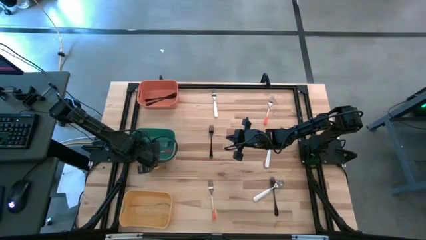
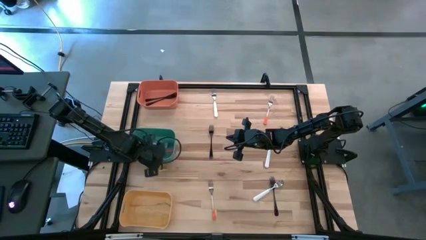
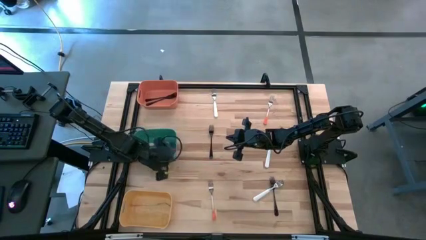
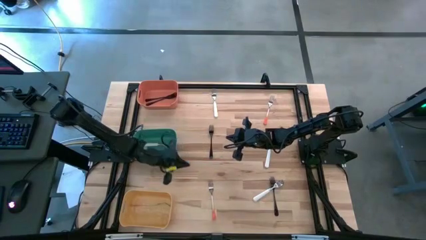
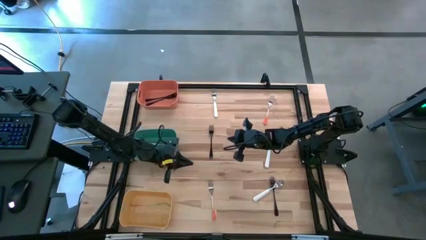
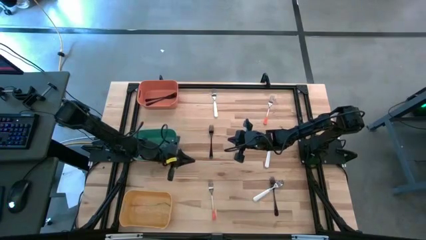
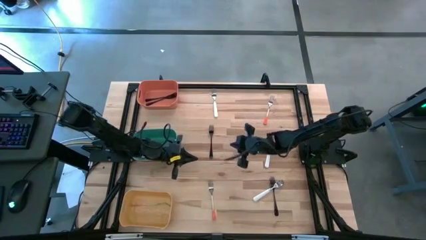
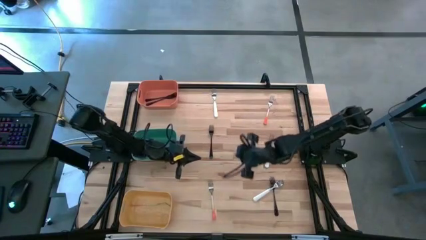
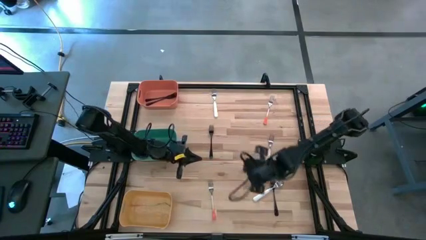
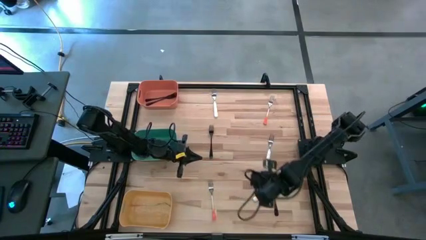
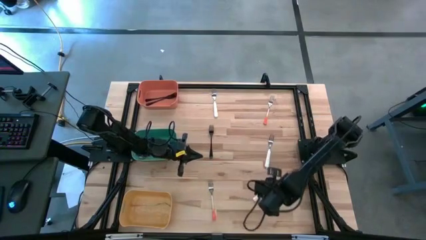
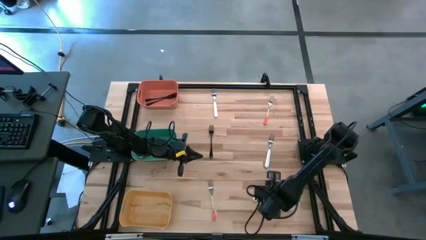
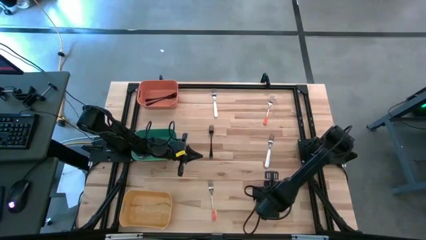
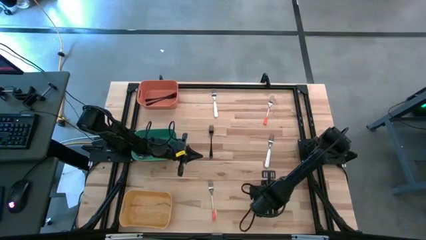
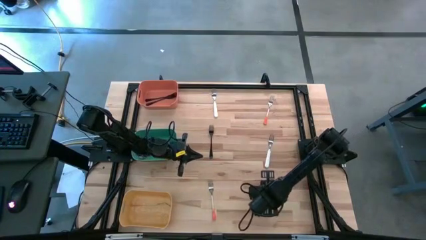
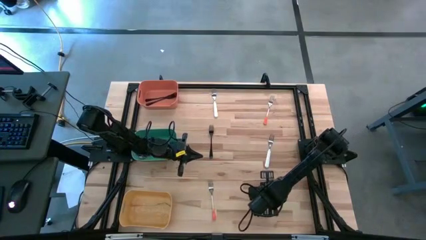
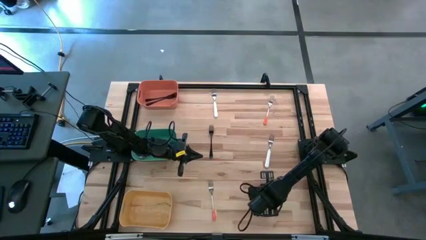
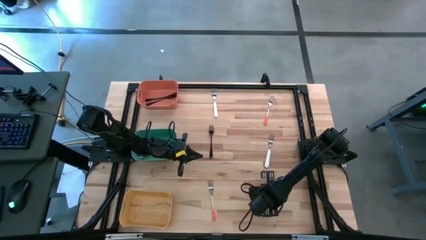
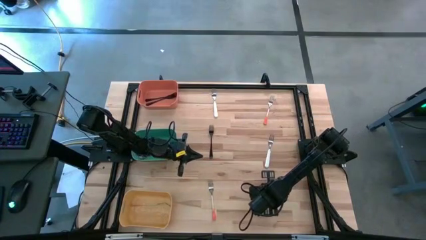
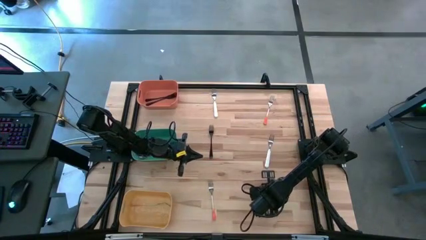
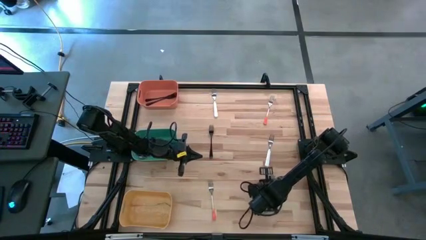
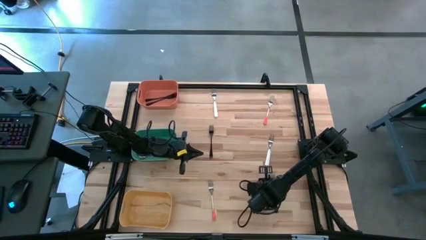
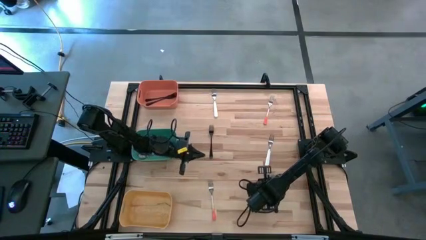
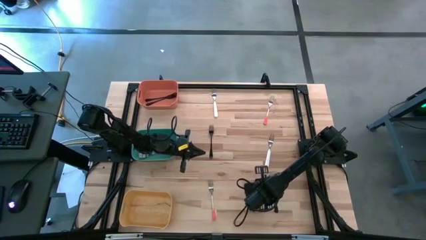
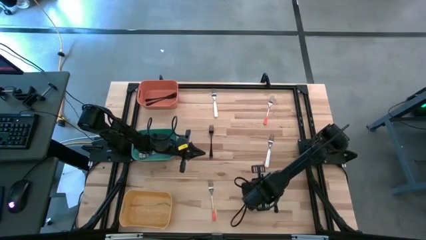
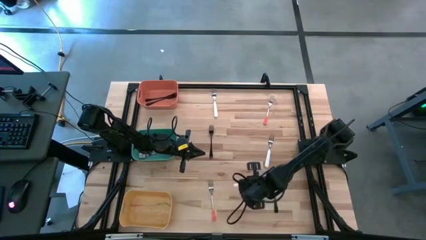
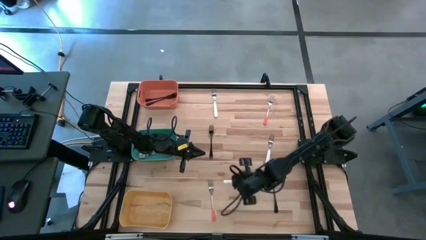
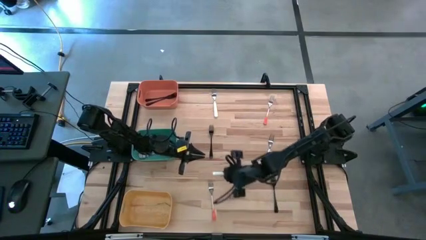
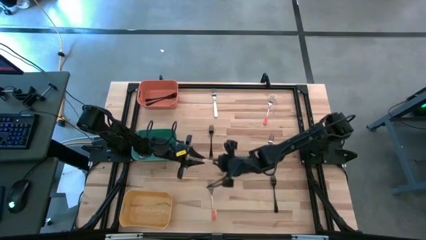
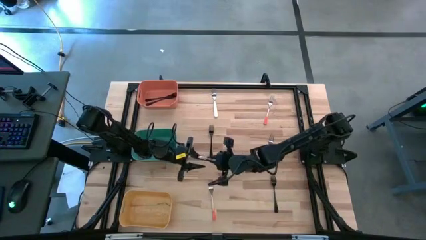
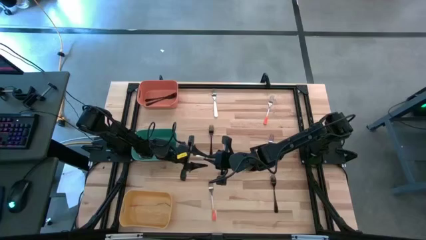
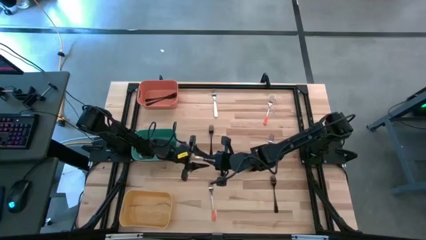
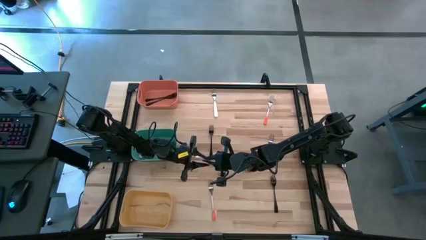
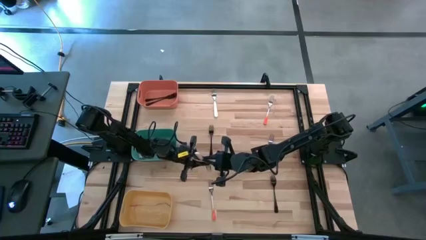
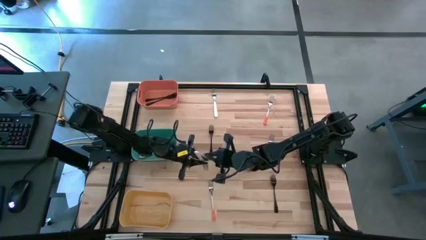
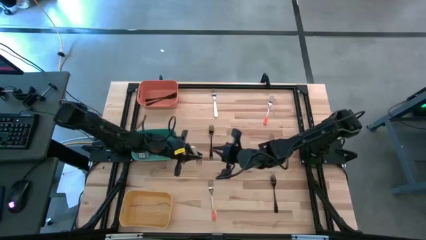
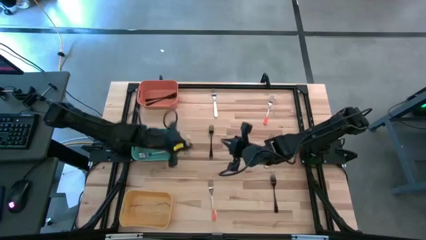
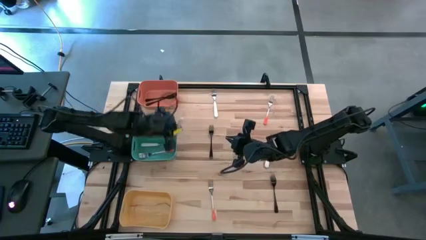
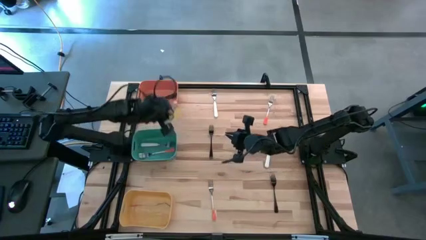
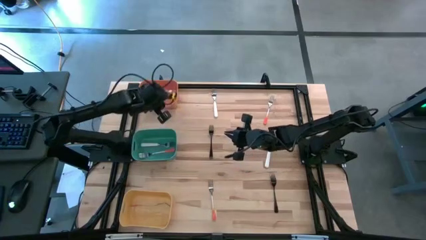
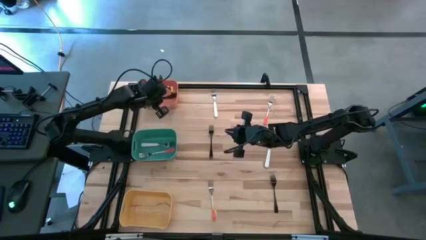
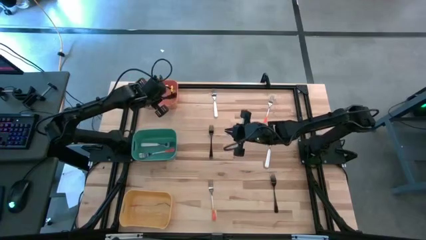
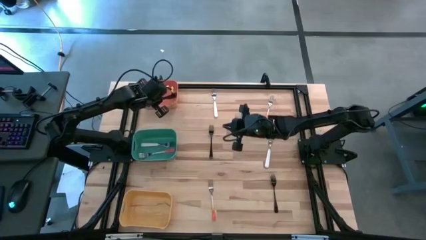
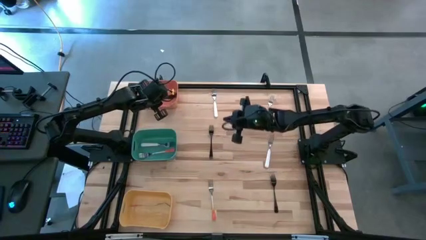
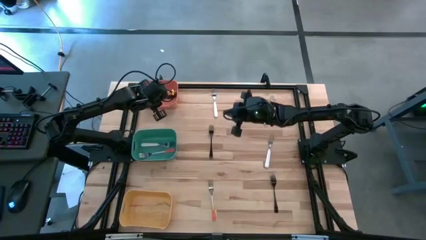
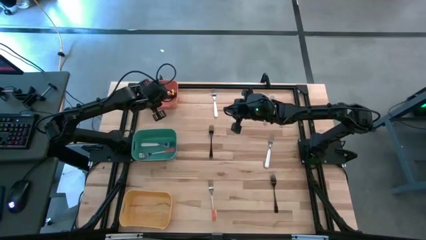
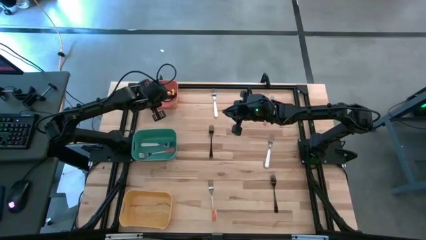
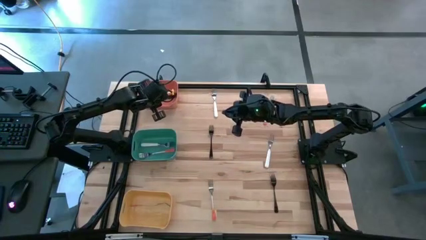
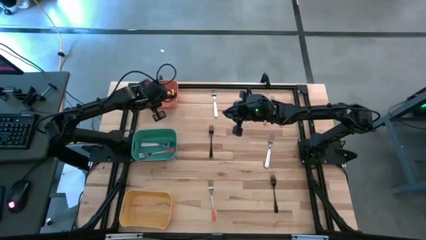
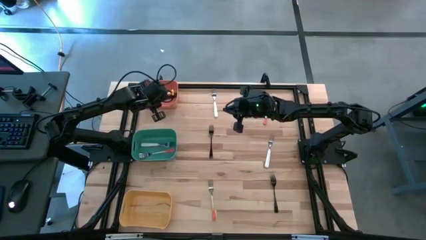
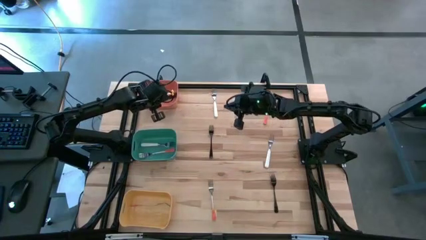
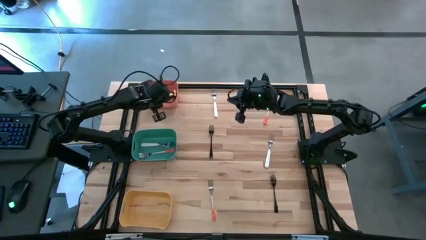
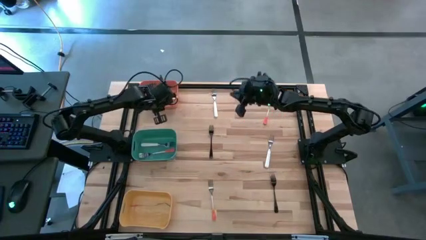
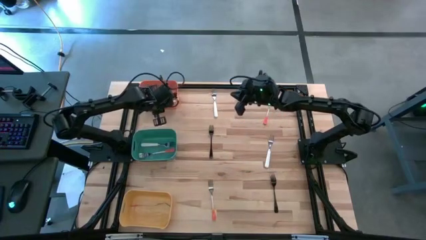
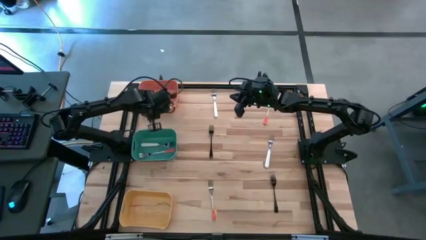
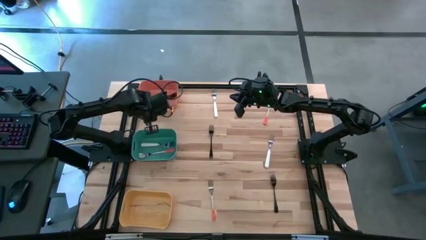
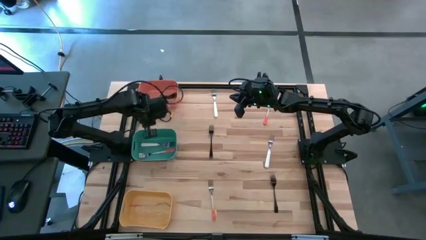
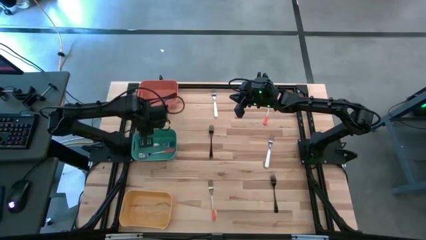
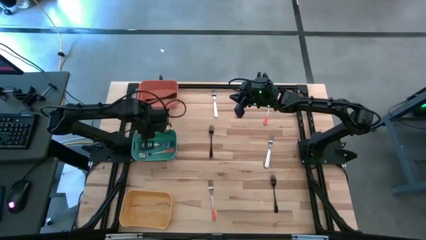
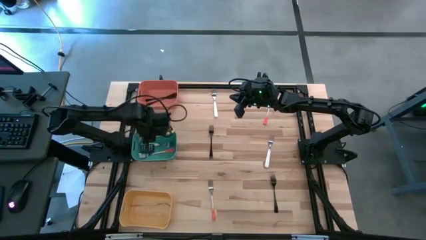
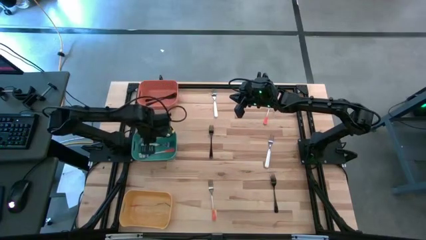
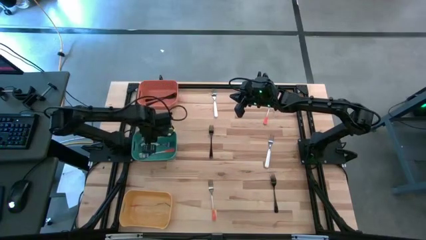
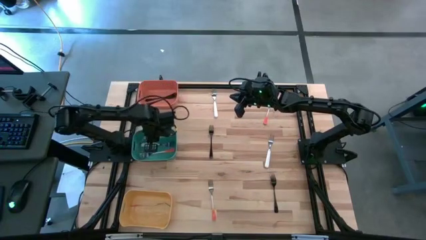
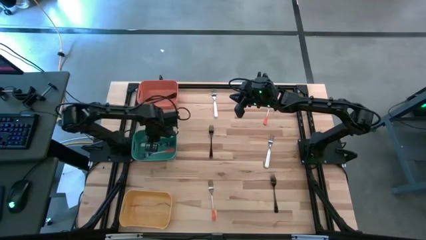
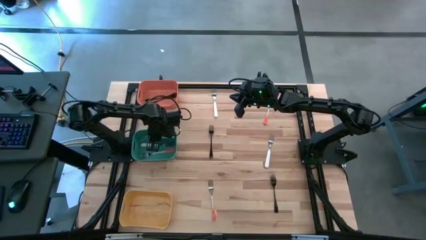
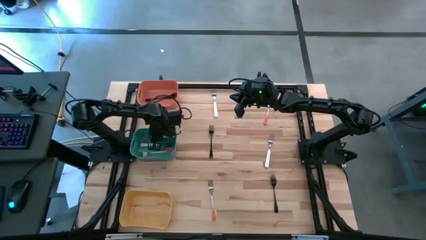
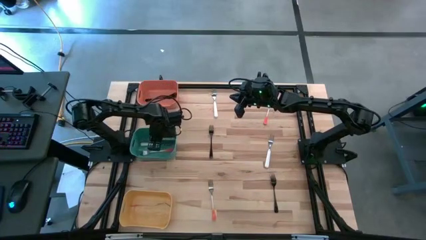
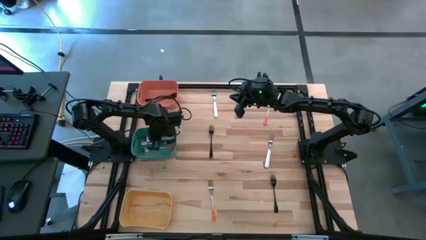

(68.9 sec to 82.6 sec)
Task: Sort silverware by color (type)
Put the white fork into the green bin

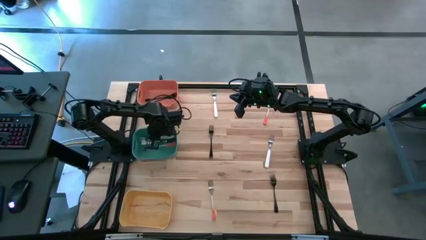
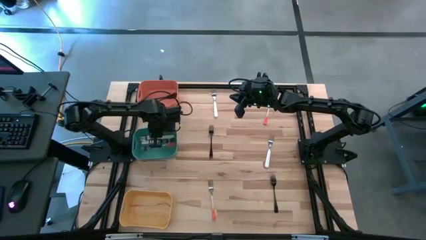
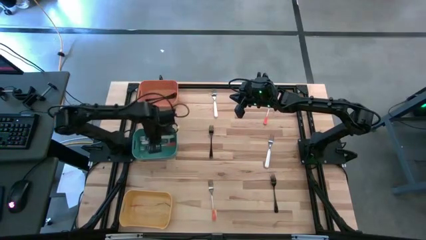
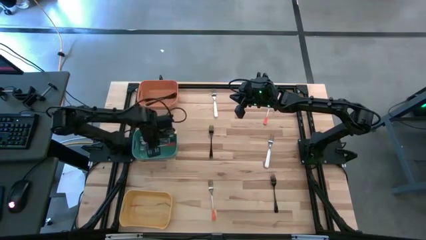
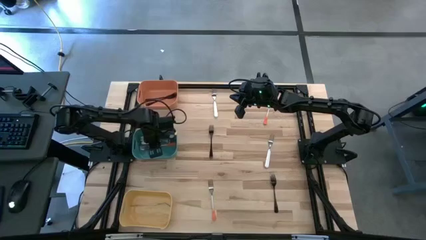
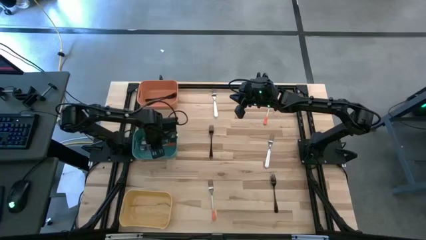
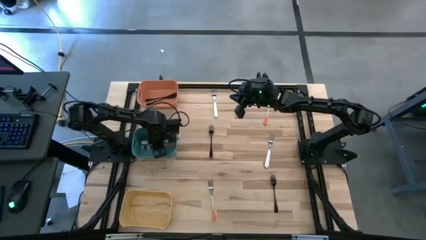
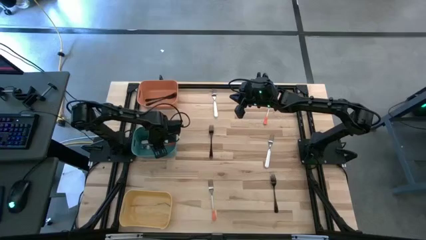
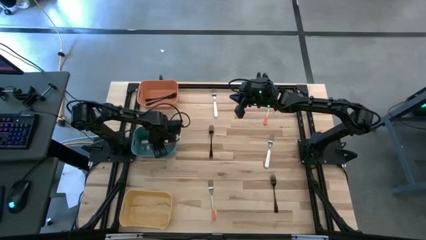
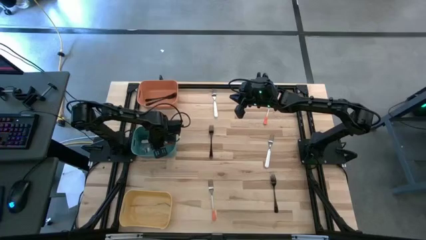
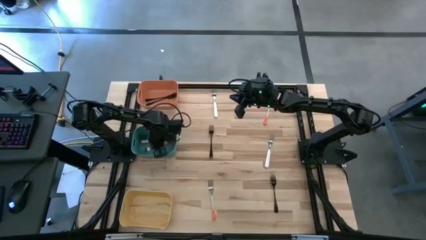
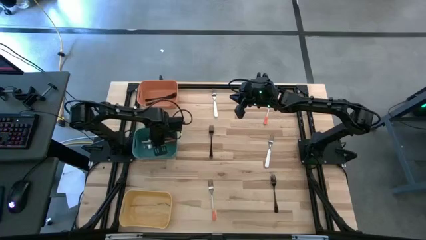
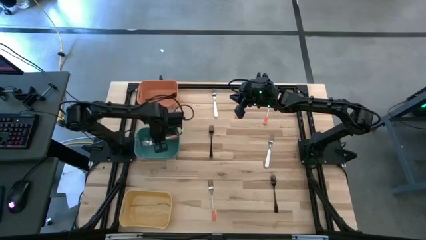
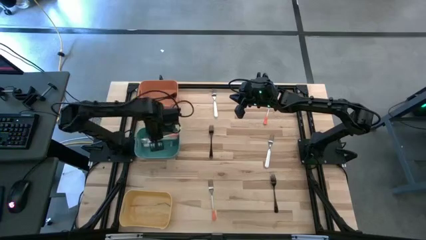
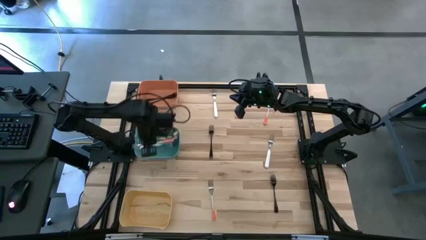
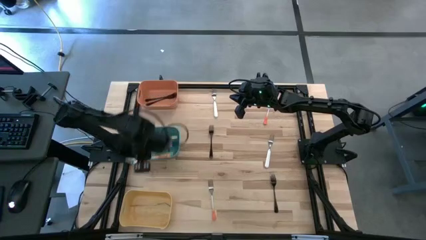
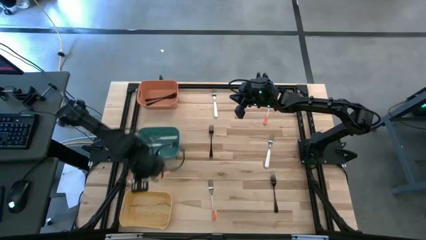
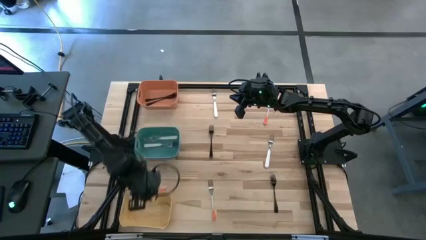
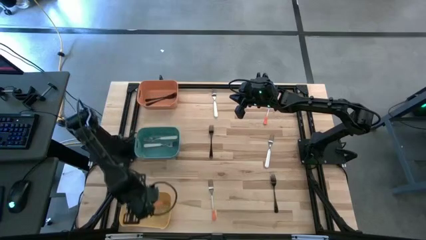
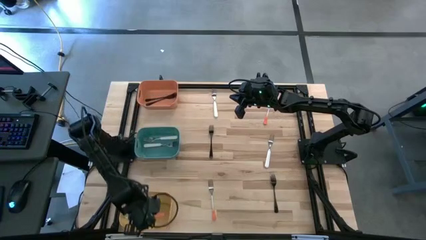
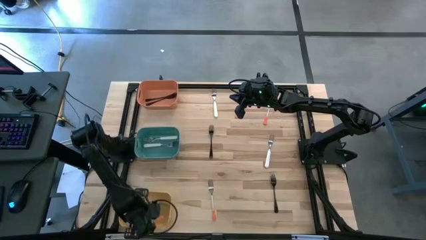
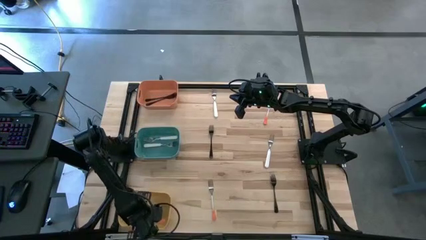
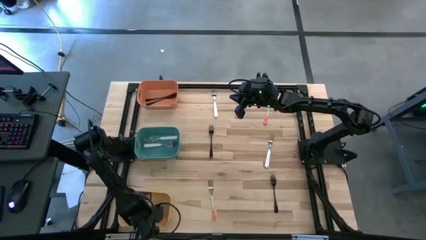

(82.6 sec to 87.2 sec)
Put the orange fork into the yellow bin
